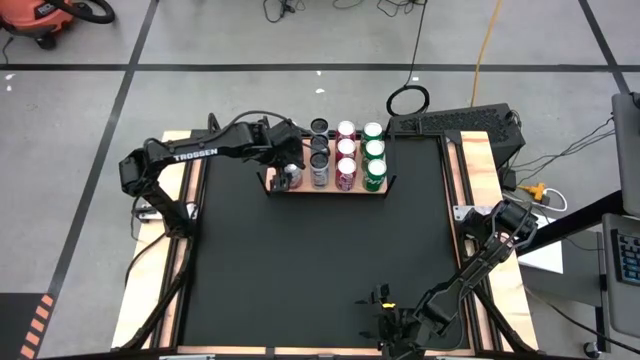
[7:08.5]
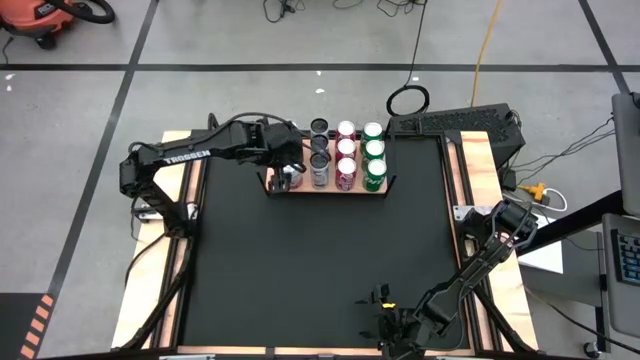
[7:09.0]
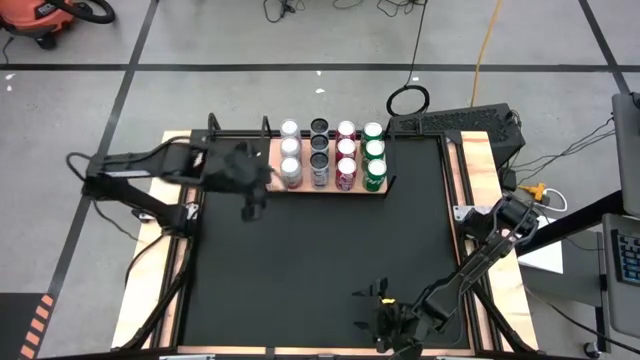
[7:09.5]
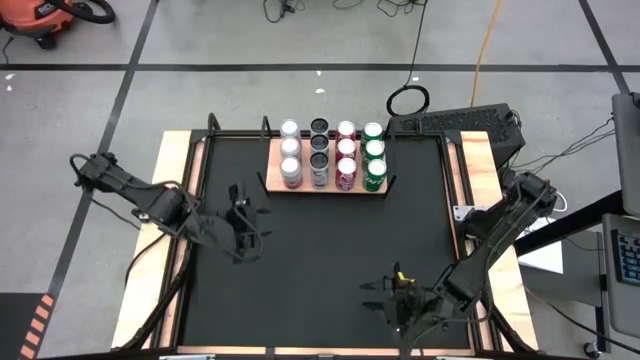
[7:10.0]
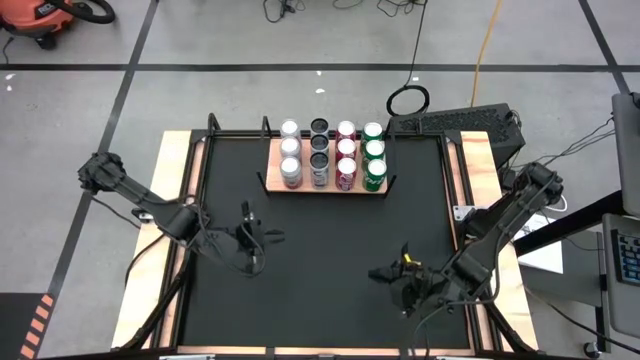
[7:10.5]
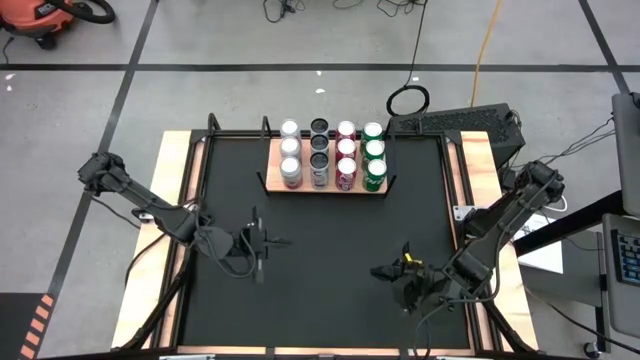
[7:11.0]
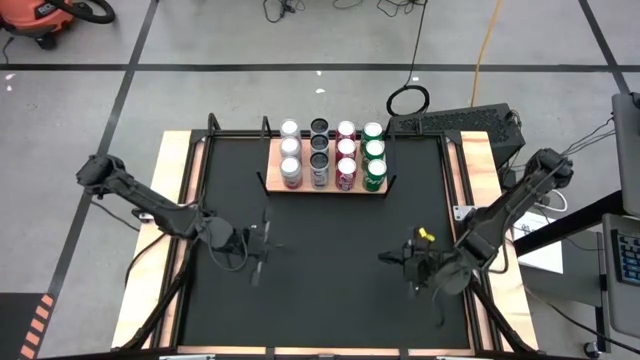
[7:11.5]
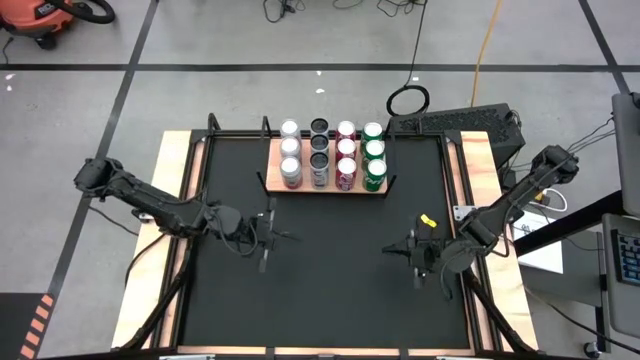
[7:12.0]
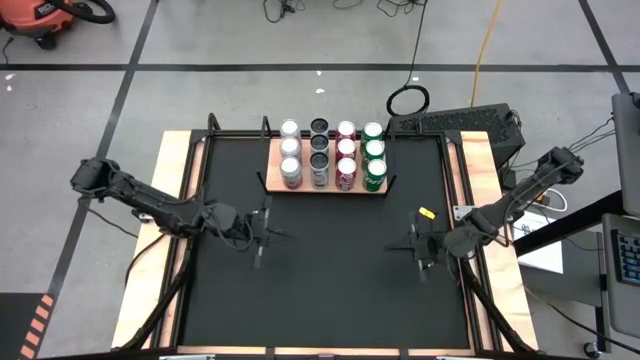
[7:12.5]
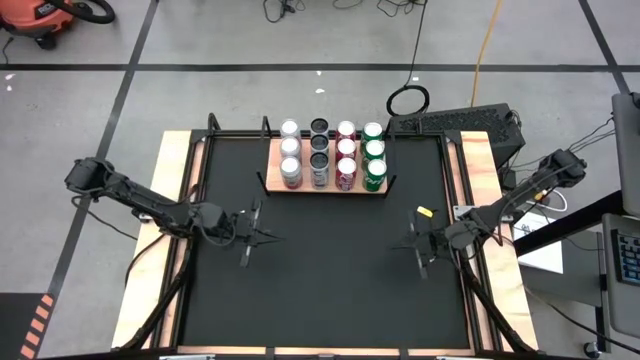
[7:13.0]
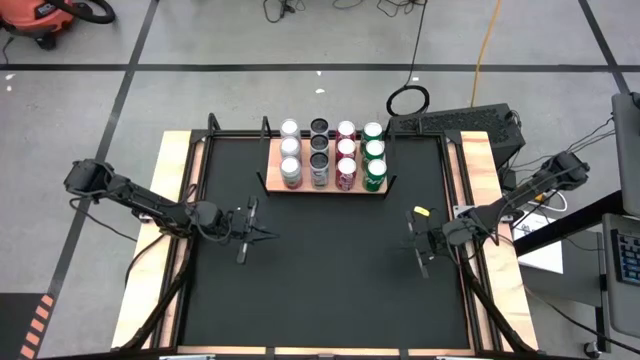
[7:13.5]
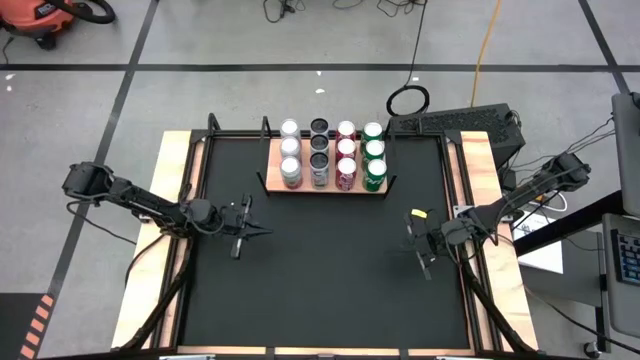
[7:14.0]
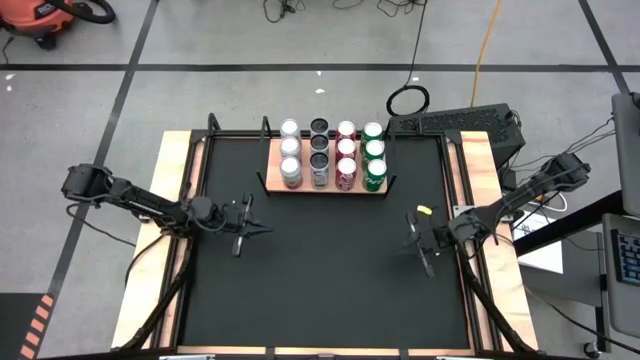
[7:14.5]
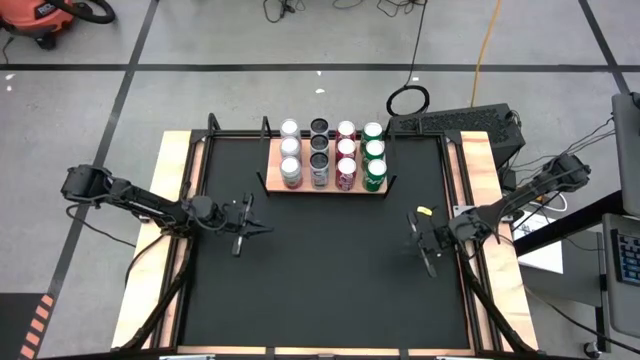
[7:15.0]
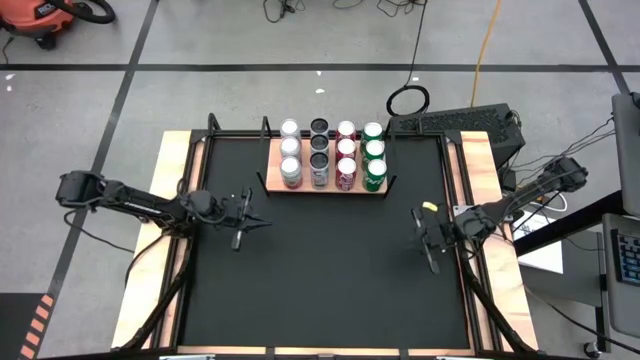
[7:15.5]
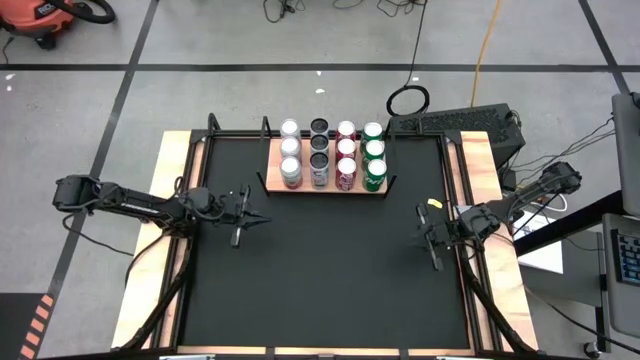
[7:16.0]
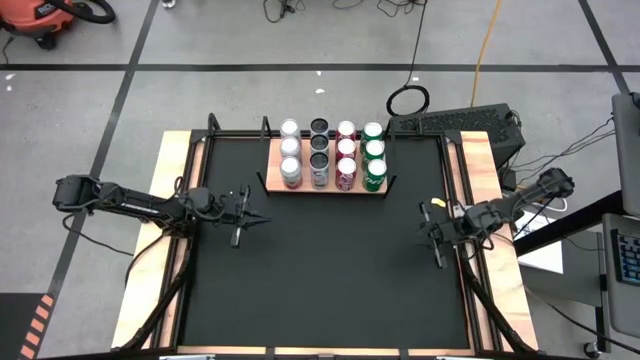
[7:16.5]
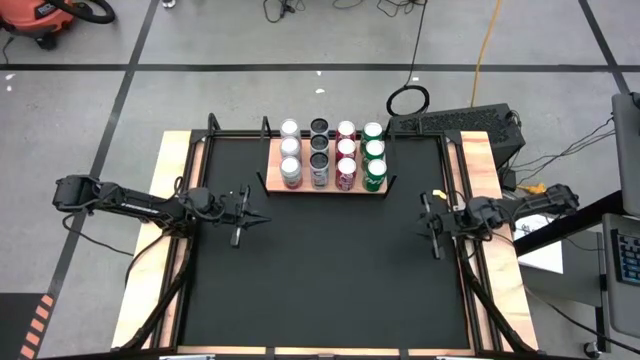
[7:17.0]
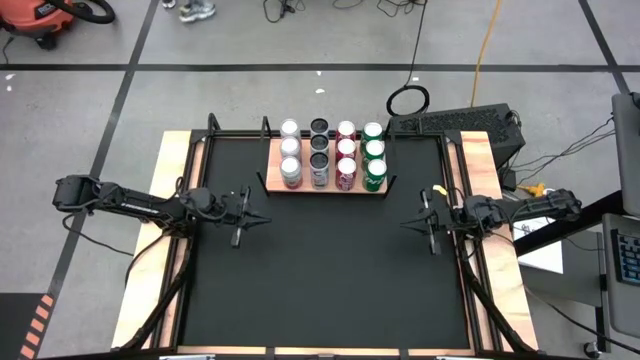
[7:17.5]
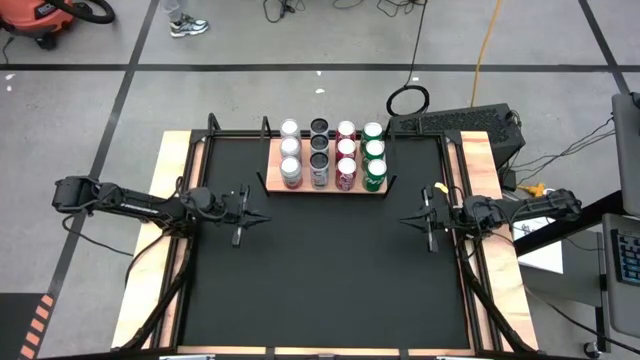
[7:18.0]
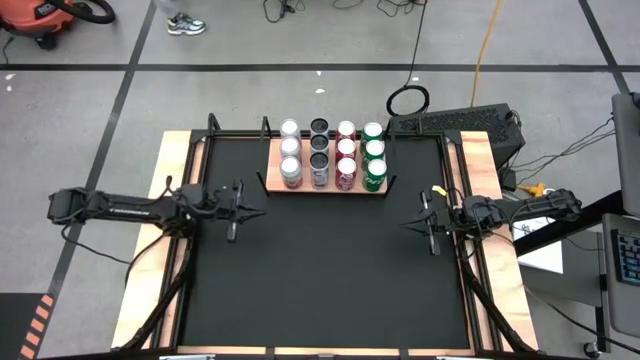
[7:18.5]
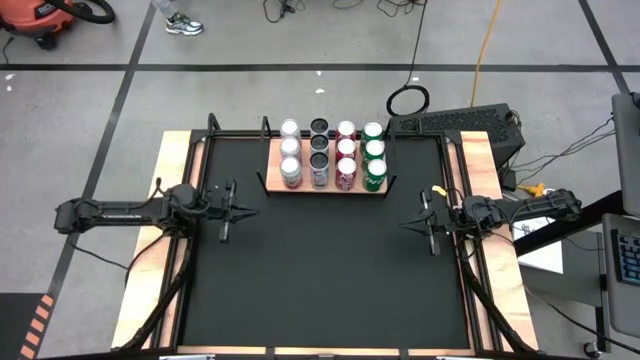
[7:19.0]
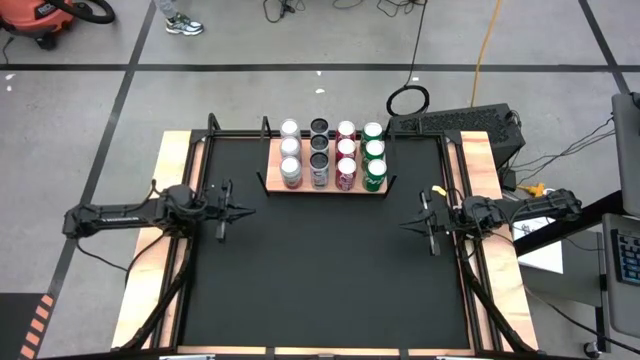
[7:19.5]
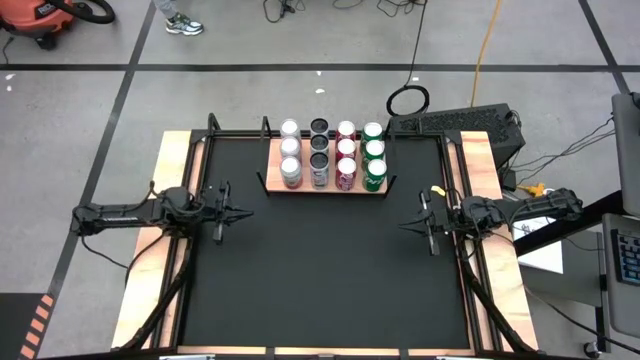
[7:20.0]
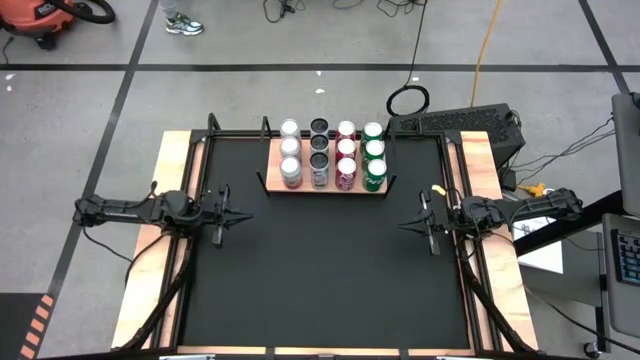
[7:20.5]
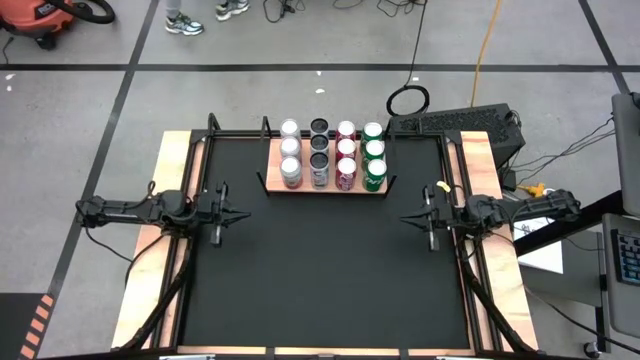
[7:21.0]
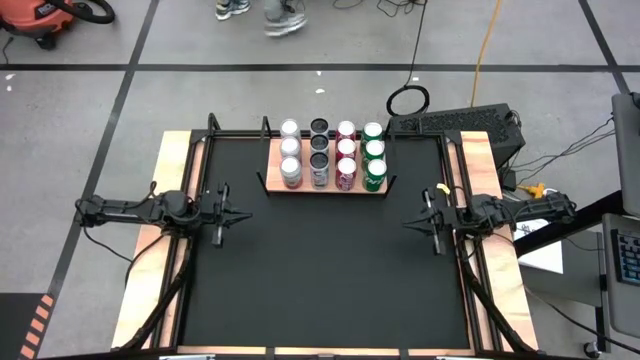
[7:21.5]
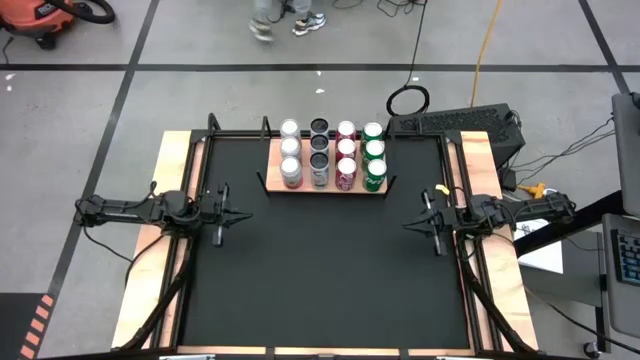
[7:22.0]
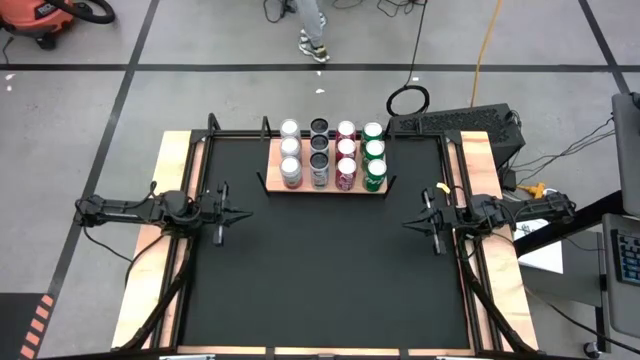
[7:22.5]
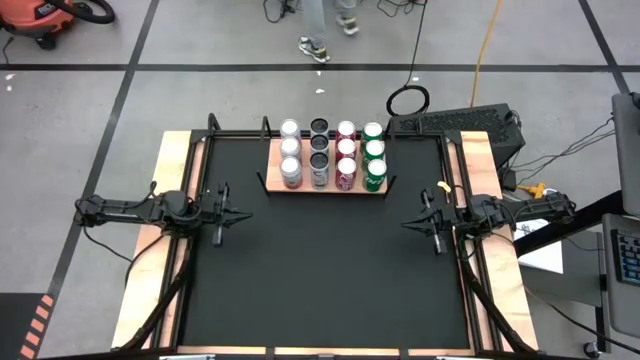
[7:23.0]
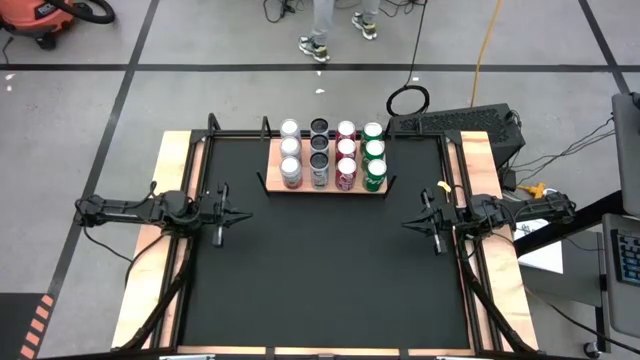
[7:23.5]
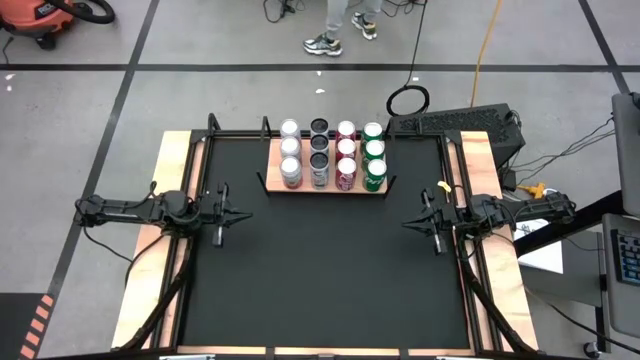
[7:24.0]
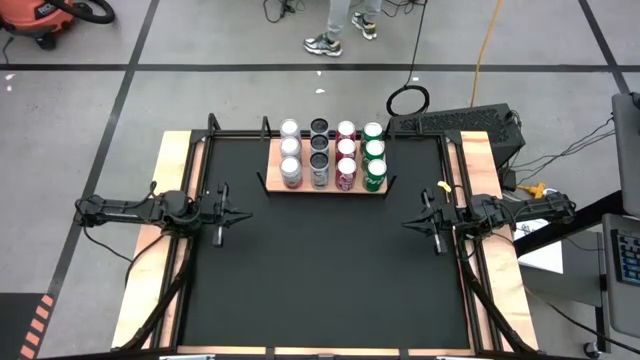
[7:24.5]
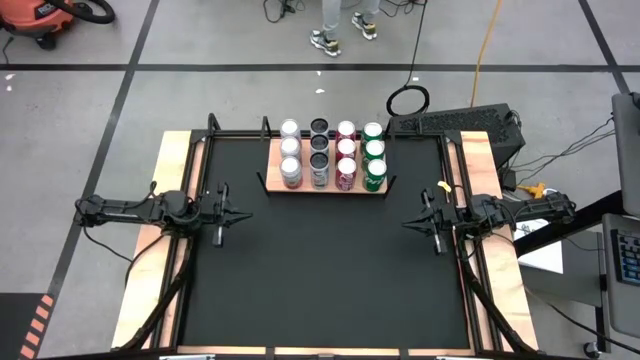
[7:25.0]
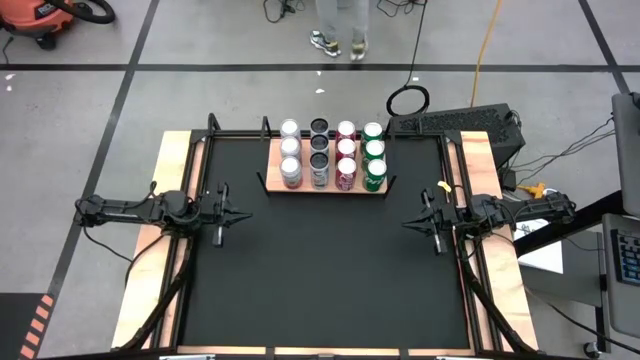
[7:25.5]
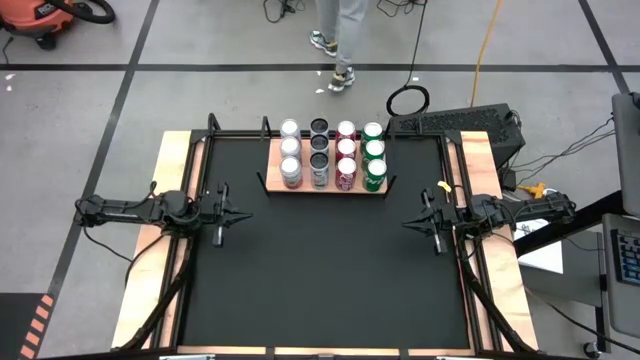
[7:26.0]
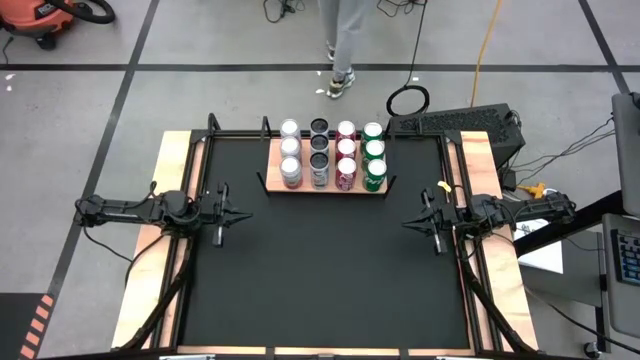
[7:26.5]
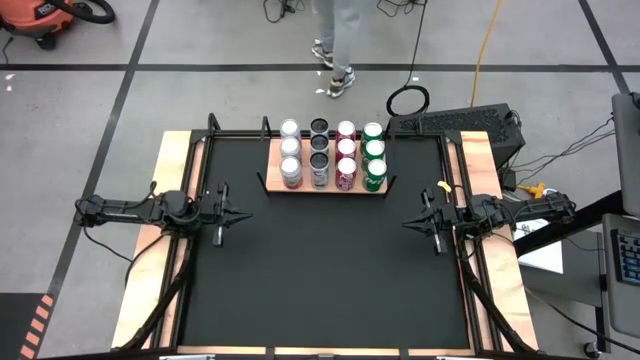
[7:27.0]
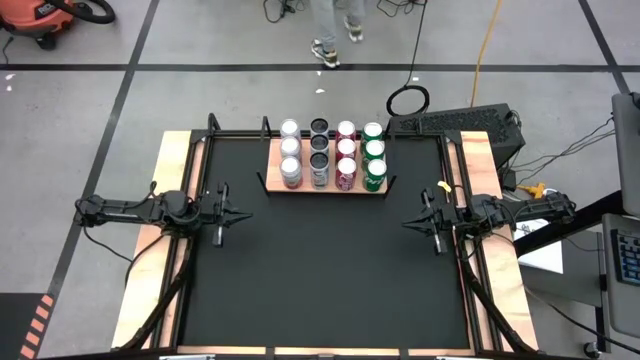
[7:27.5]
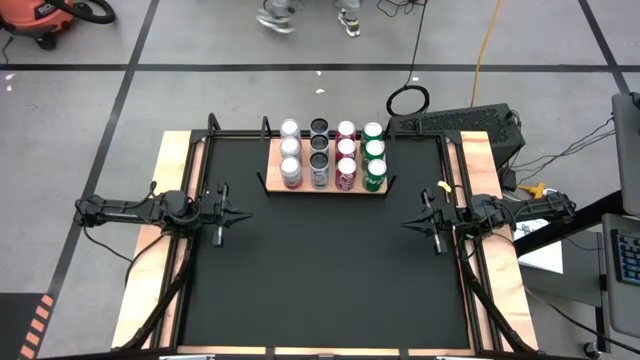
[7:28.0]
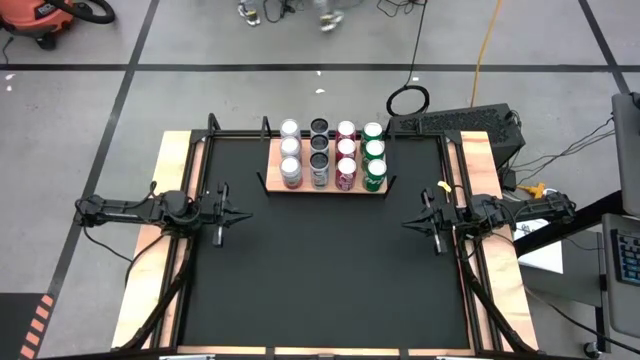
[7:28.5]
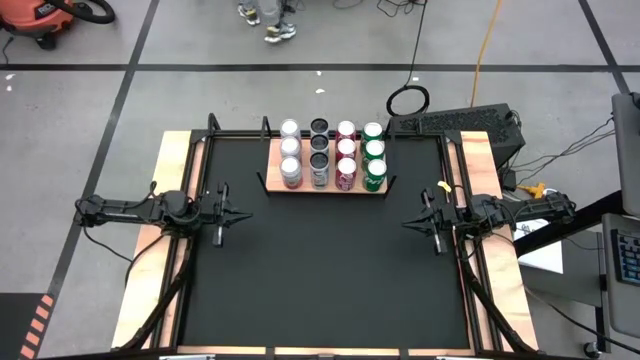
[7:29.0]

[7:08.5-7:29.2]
Task: Place canned beverage on shelf
Return to Home Position
